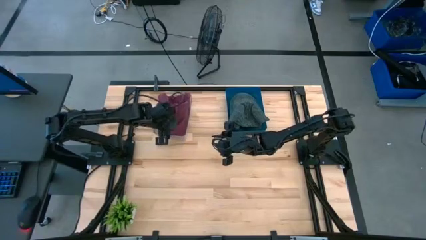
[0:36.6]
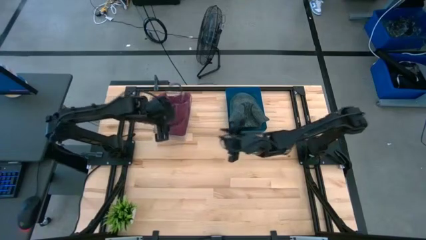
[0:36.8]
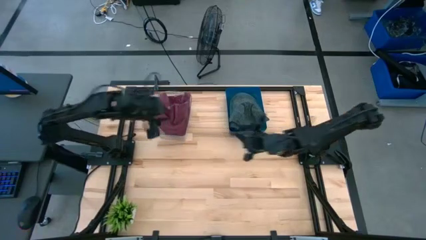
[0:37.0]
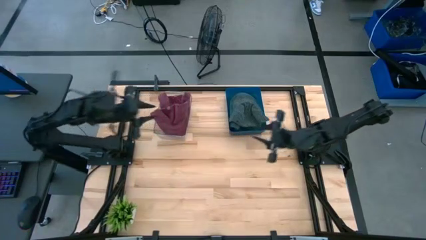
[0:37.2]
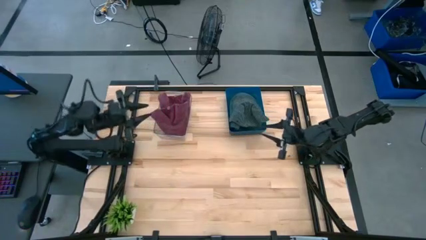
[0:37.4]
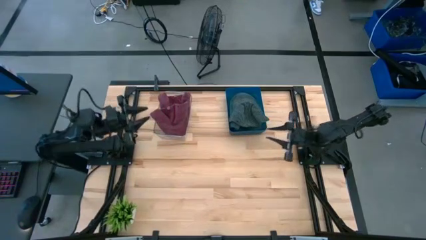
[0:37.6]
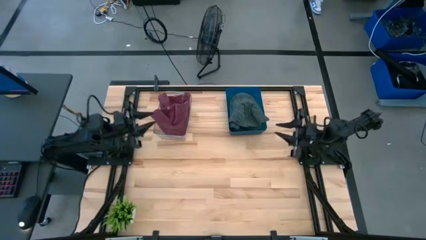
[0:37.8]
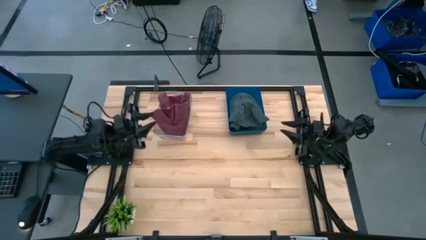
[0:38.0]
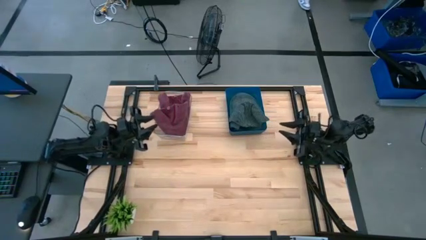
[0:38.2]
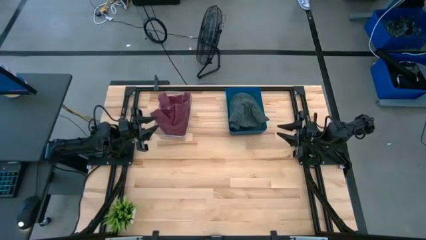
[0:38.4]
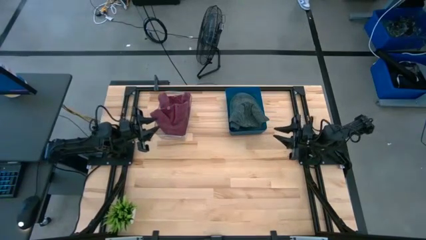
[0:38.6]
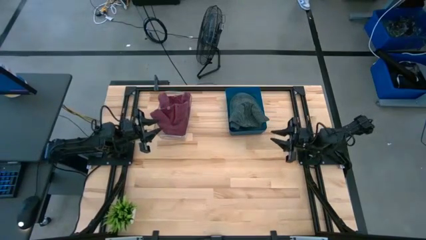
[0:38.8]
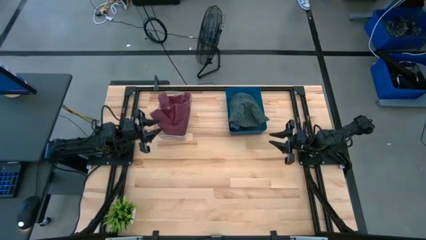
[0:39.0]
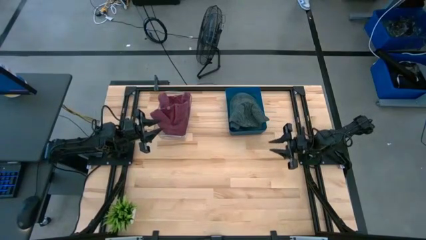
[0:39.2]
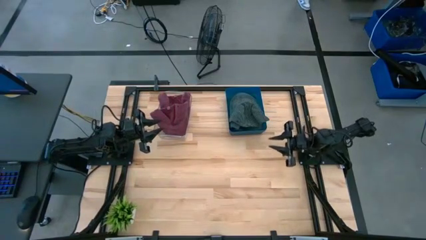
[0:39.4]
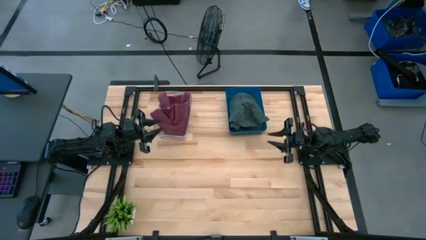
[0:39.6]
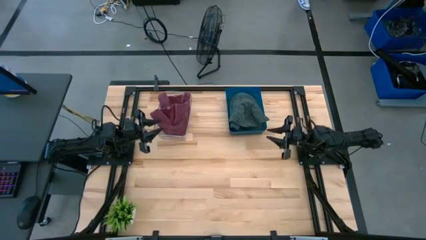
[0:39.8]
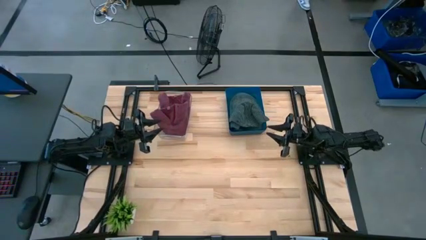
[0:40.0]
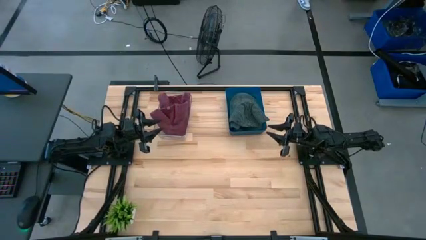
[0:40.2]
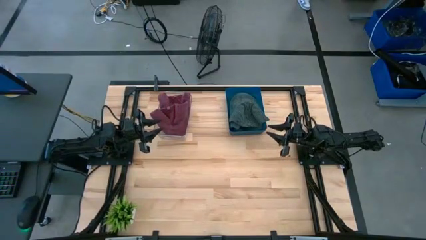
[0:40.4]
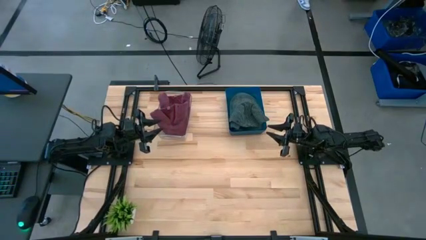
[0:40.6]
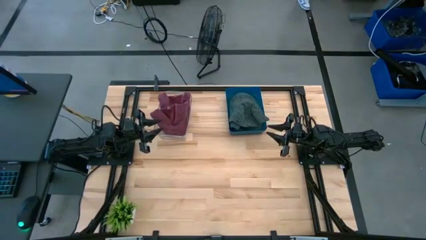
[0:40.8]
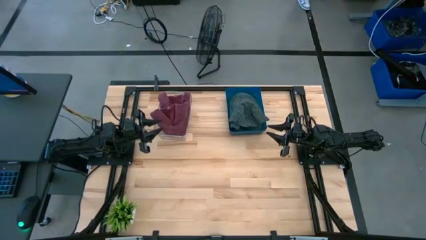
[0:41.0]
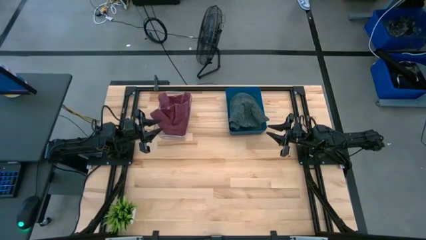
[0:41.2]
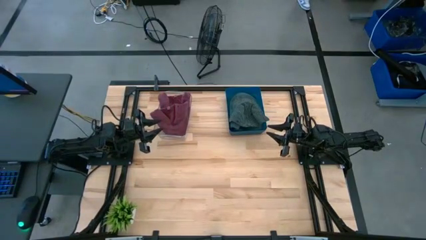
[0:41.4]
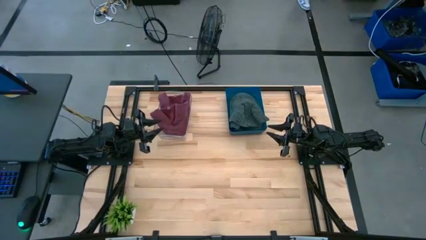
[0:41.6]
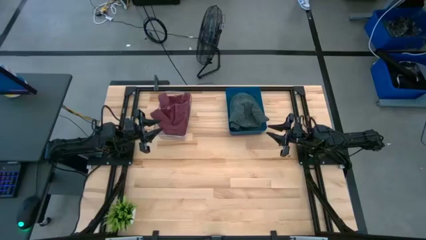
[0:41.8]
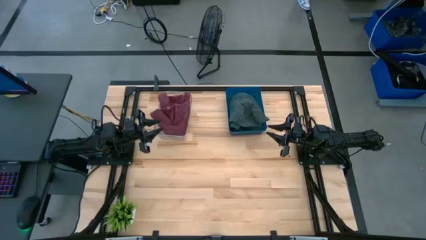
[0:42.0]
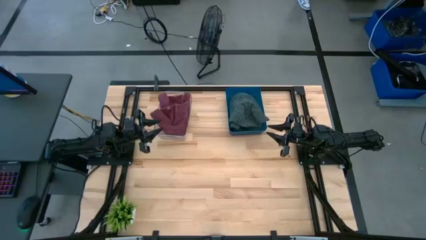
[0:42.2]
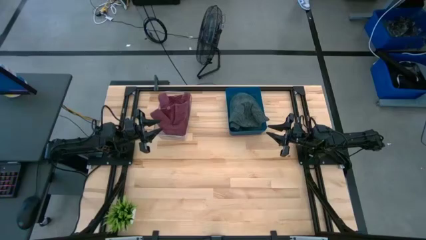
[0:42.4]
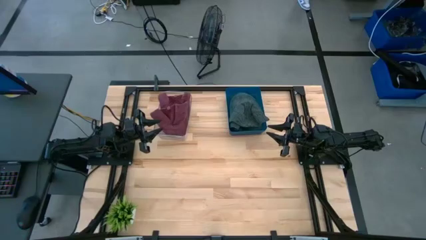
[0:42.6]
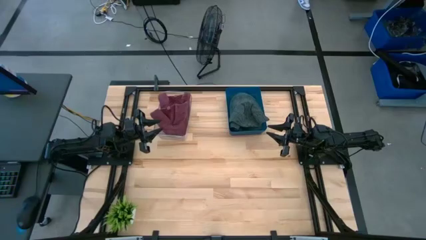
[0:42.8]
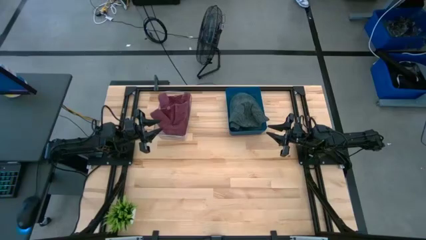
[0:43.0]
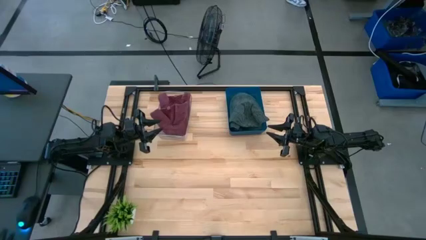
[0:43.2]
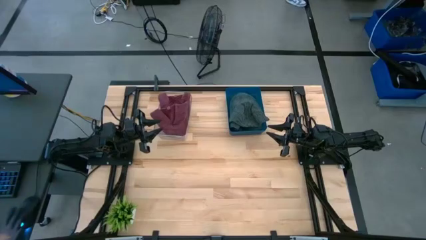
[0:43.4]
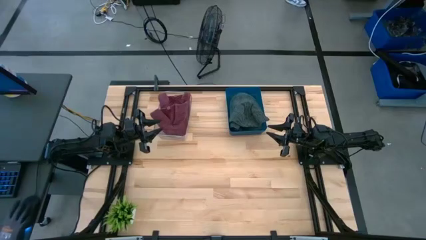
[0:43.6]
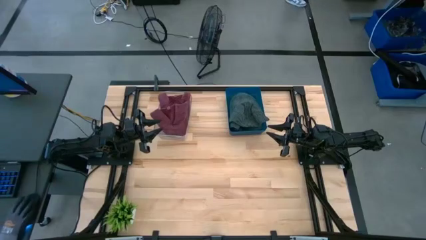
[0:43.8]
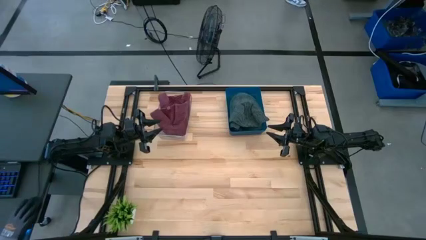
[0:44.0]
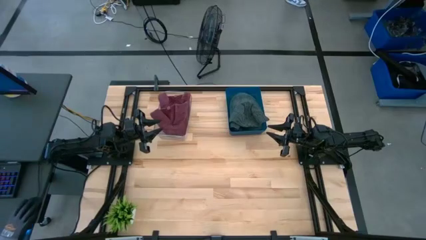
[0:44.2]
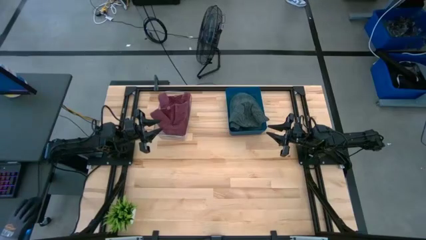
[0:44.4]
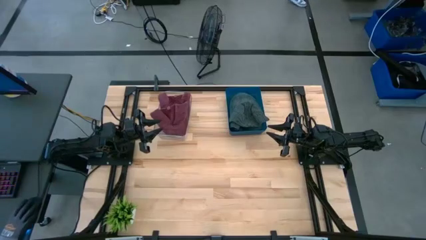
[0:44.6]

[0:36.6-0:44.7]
Task: Pick & Place hat
Return to Home Position

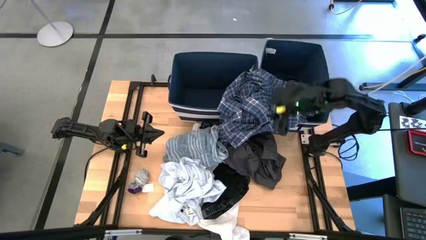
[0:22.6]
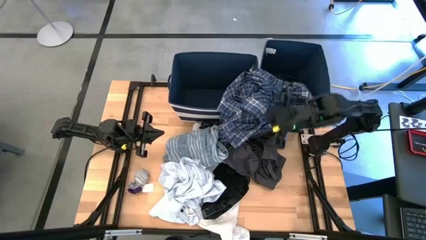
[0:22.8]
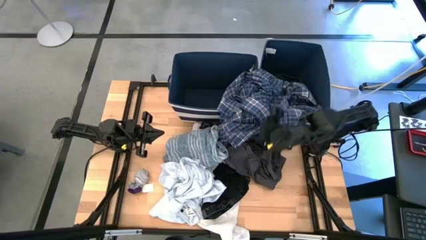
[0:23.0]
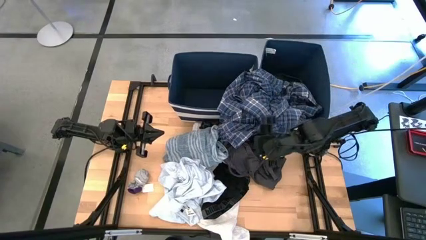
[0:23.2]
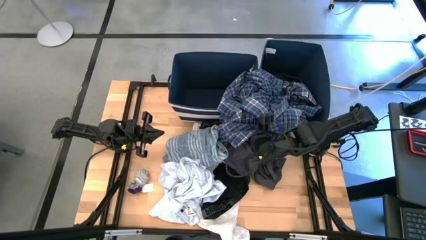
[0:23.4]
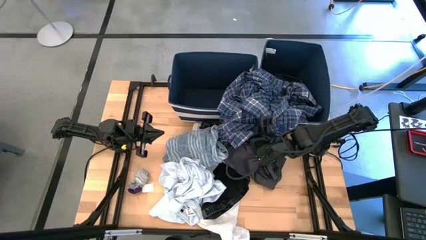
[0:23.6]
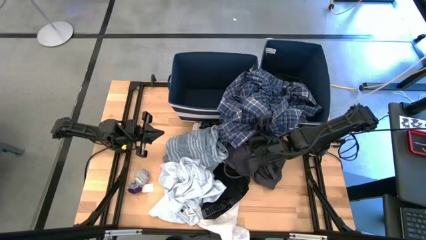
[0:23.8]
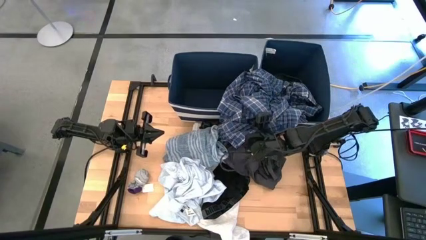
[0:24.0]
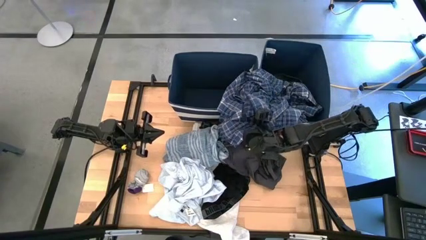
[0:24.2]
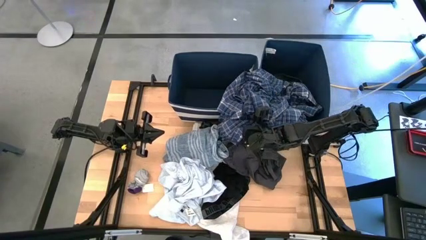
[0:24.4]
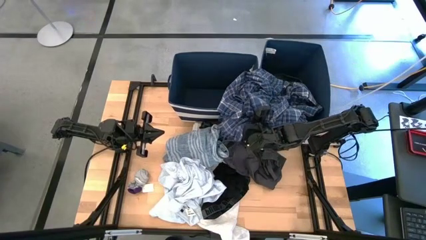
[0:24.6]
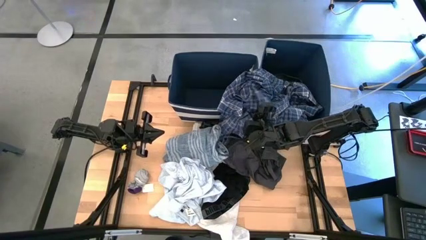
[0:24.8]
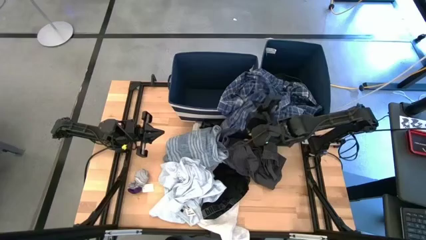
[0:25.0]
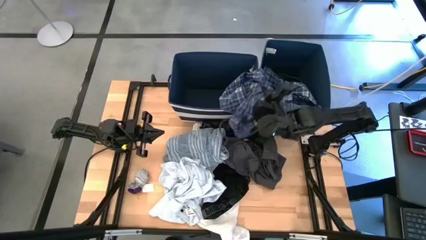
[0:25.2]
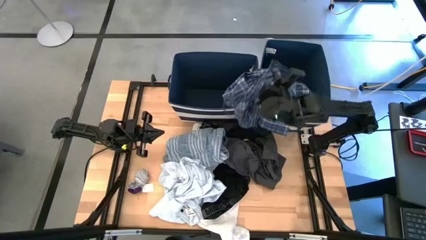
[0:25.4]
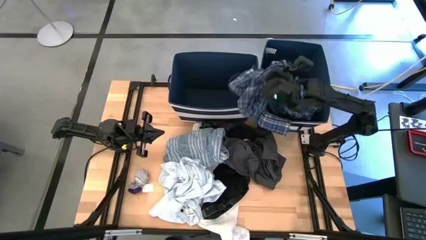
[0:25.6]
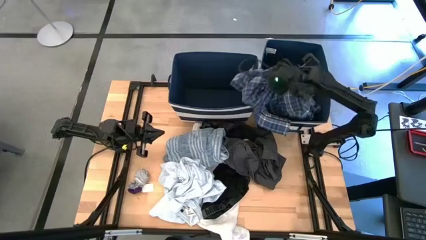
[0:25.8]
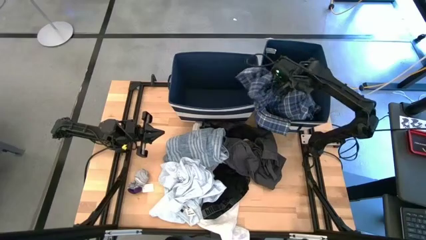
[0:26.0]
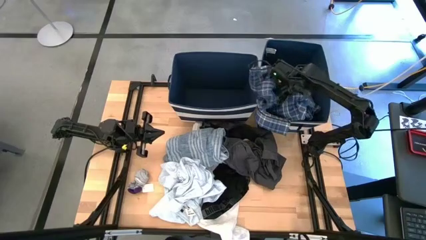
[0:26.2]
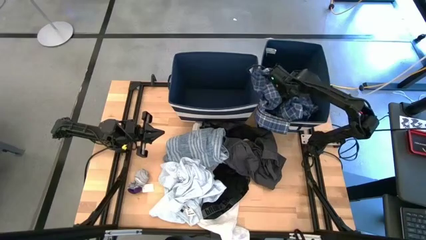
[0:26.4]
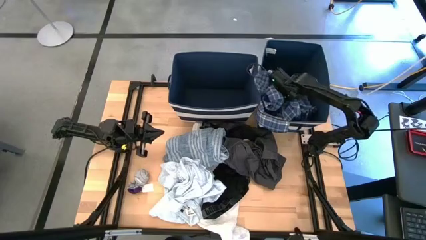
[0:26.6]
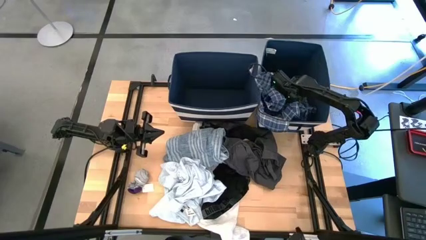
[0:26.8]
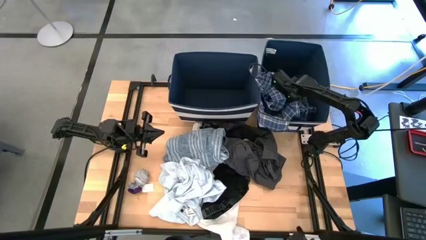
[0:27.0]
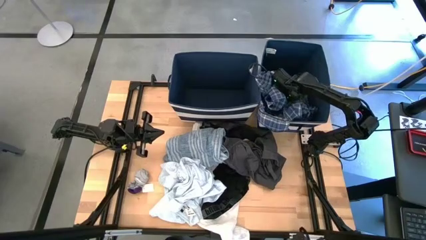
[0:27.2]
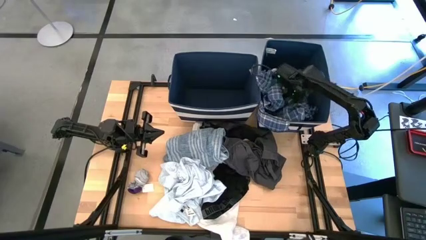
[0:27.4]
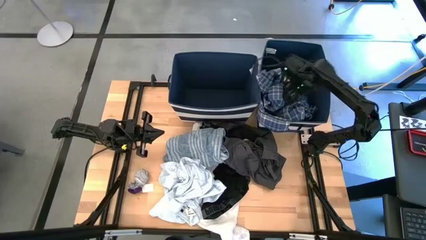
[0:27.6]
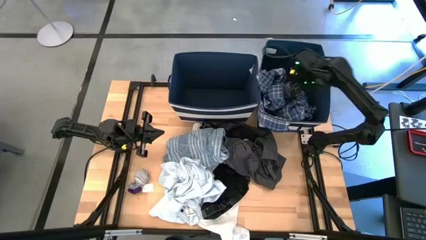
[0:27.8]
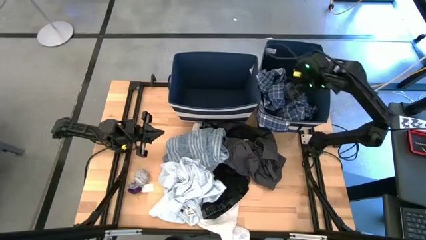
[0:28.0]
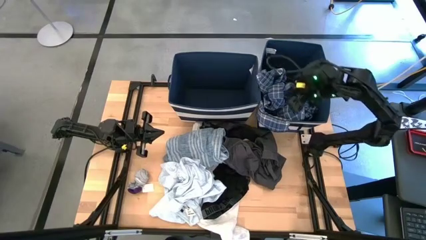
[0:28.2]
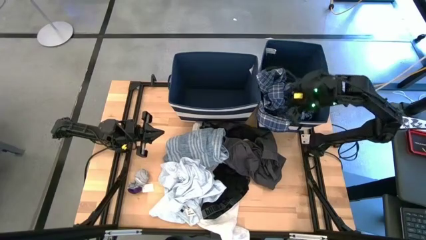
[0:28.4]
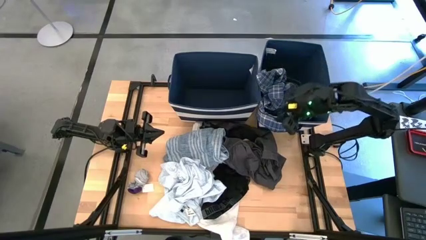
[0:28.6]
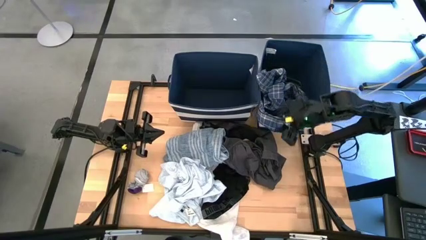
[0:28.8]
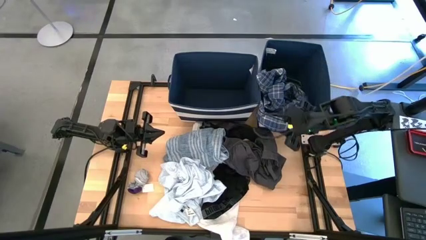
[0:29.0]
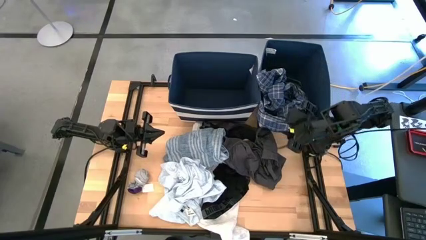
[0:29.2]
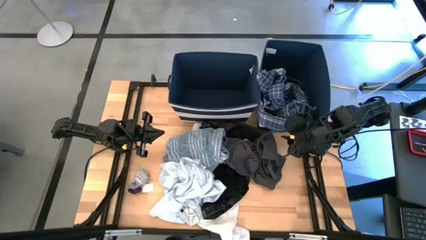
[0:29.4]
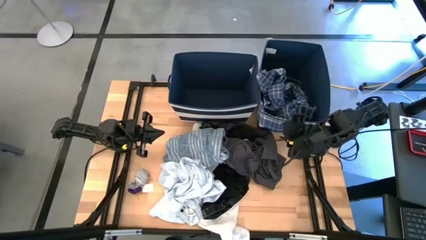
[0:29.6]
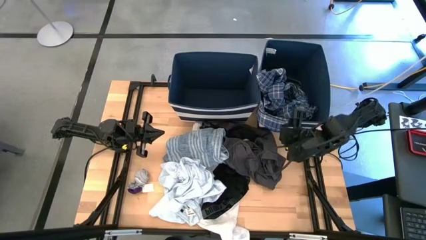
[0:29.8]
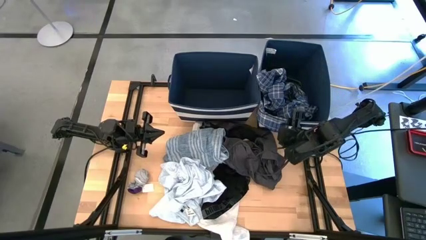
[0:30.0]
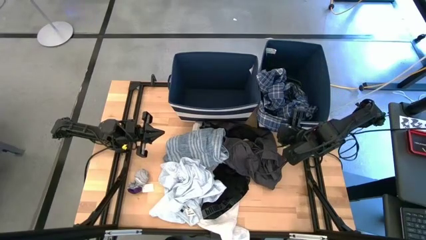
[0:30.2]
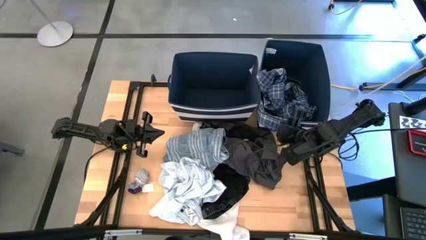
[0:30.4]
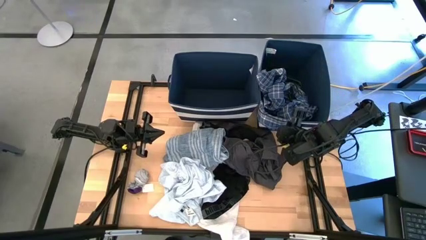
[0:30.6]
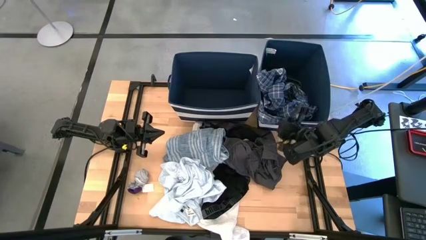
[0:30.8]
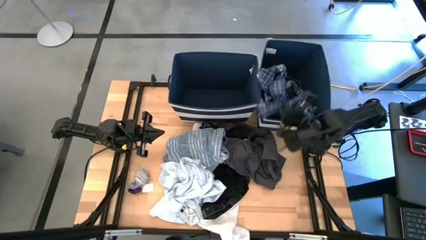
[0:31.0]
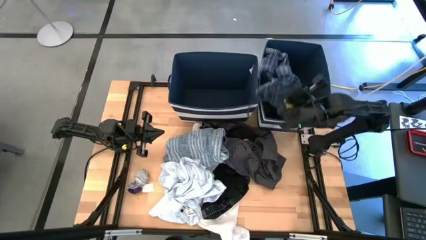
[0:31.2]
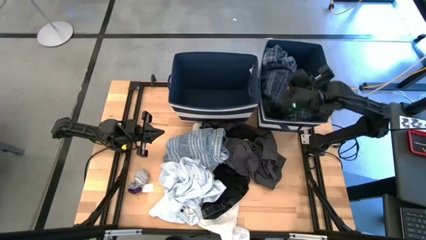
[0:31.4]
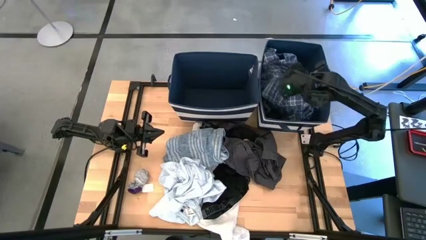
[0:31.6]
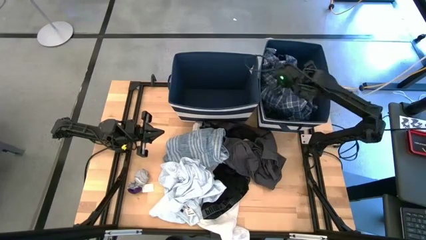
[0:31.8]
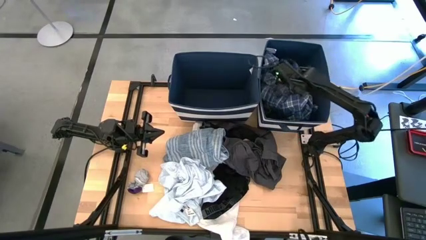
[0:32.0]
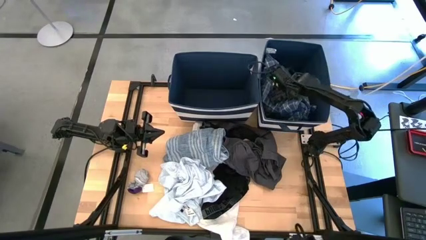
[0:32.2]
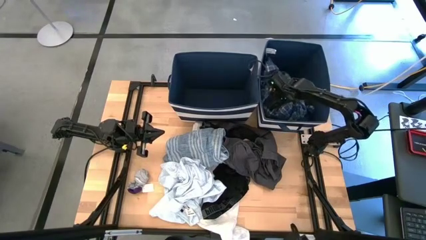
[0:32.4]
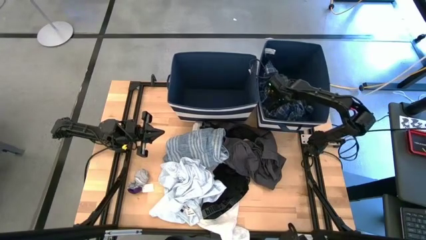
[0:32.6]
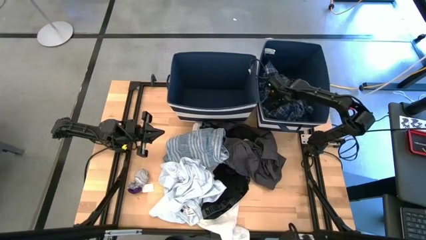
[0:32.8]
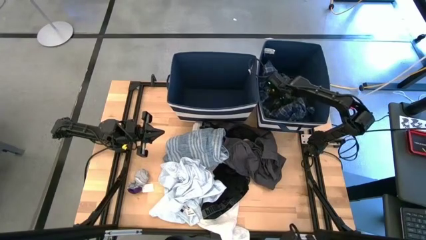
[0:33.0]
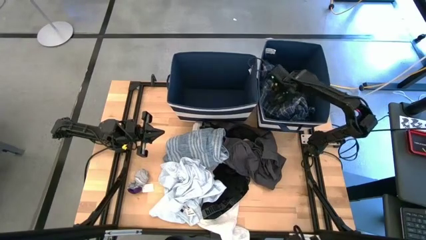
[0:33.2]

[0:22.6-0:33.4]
Task: Sort clothes
Put the blue checkered polo into the right blue laundry organizer
